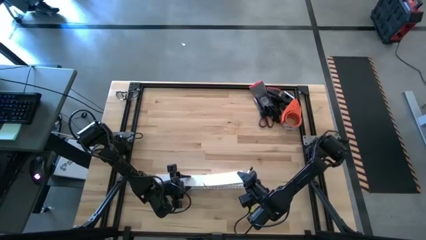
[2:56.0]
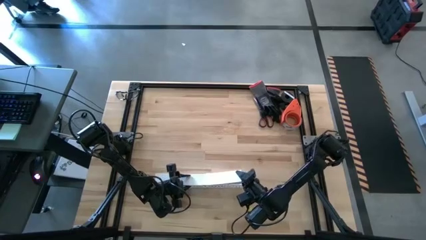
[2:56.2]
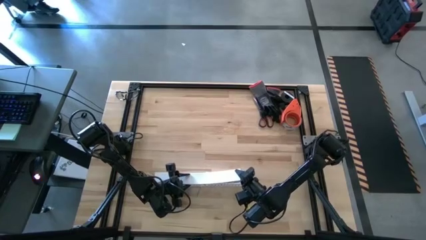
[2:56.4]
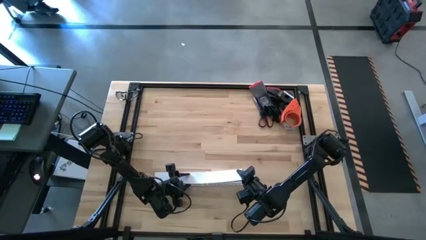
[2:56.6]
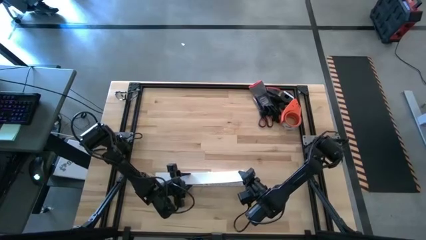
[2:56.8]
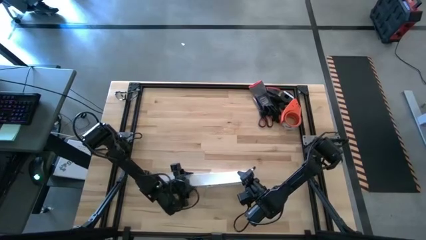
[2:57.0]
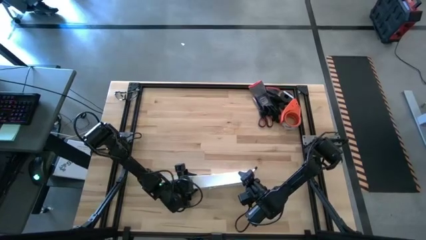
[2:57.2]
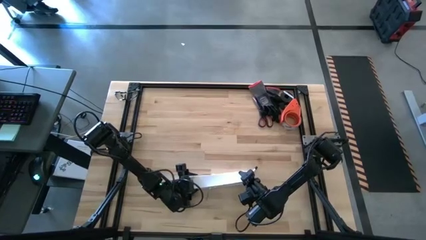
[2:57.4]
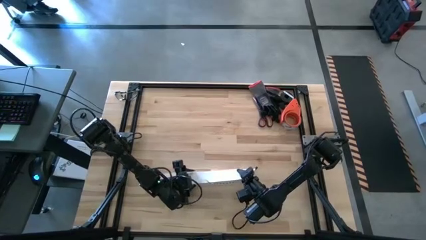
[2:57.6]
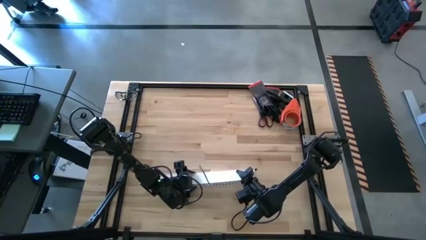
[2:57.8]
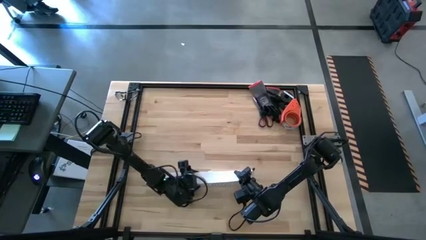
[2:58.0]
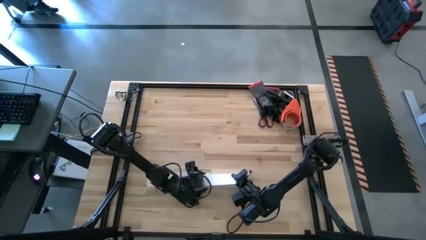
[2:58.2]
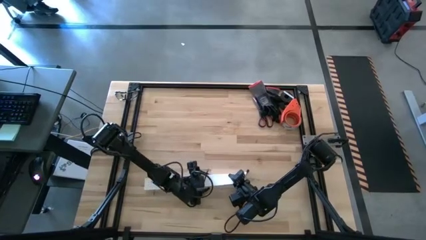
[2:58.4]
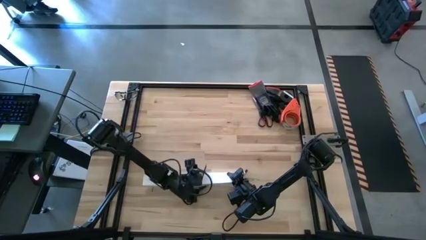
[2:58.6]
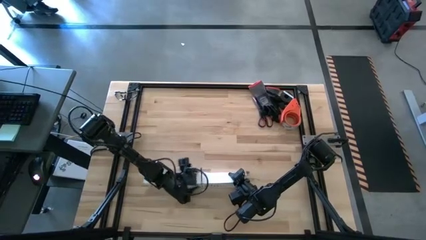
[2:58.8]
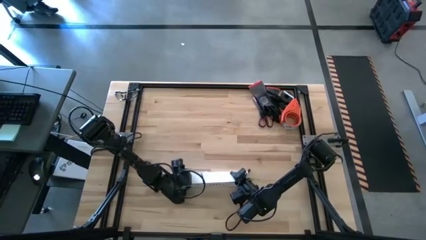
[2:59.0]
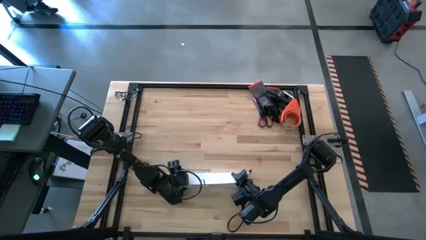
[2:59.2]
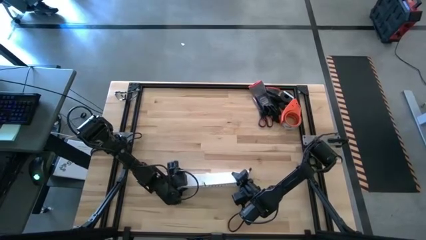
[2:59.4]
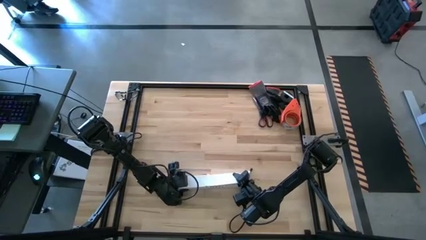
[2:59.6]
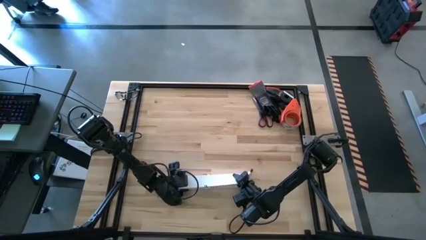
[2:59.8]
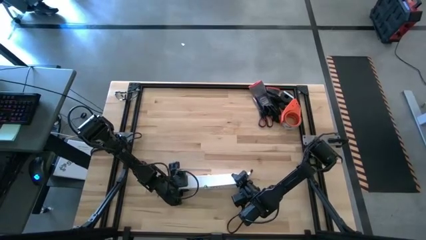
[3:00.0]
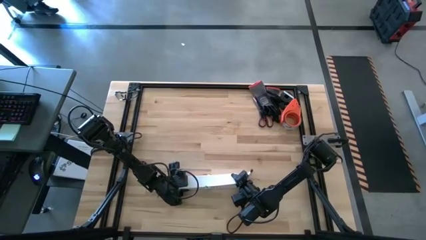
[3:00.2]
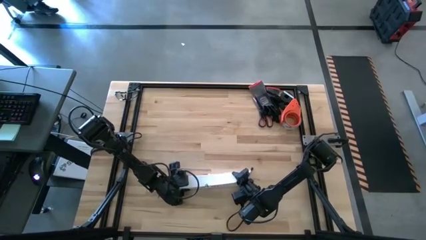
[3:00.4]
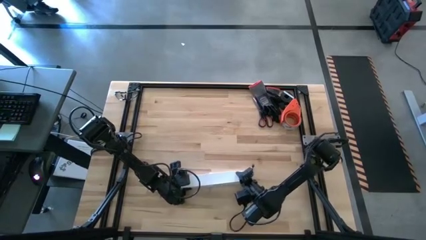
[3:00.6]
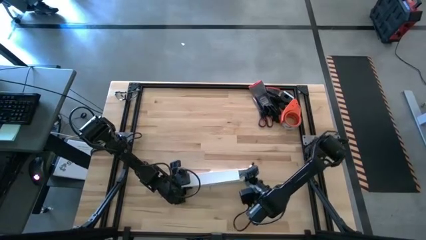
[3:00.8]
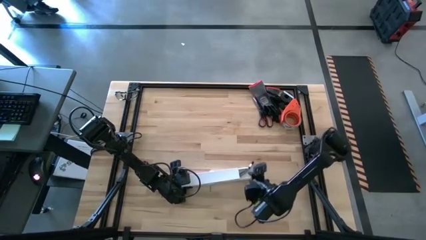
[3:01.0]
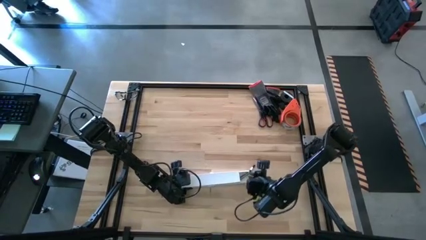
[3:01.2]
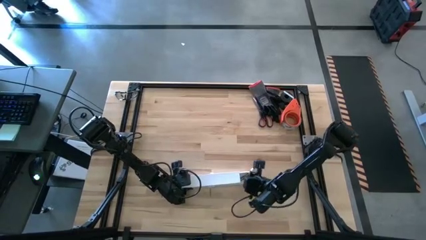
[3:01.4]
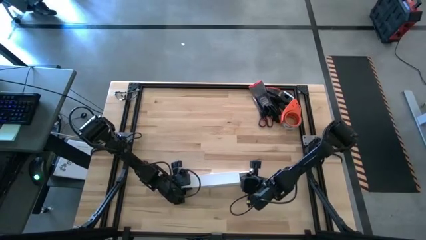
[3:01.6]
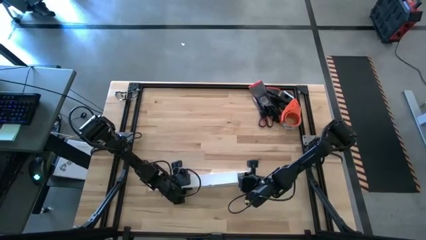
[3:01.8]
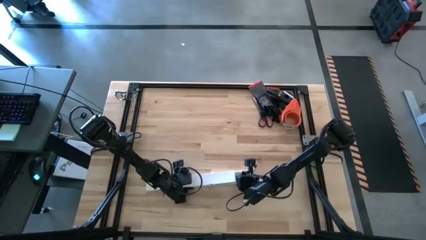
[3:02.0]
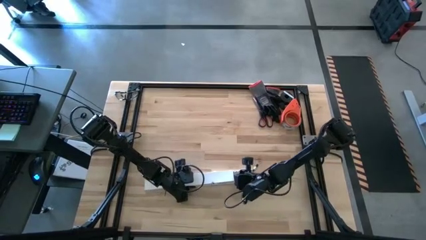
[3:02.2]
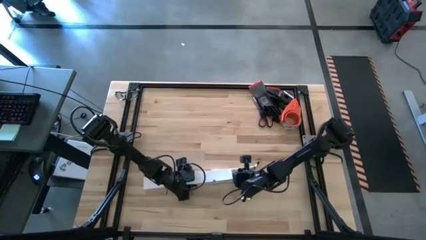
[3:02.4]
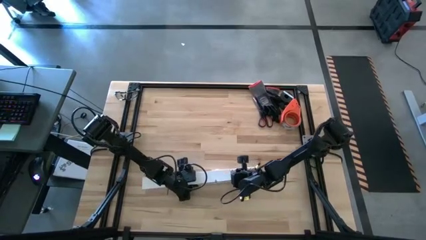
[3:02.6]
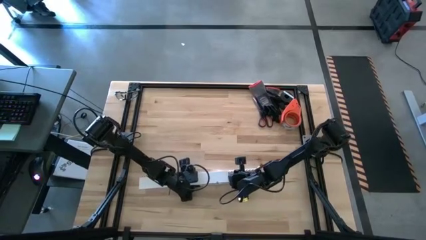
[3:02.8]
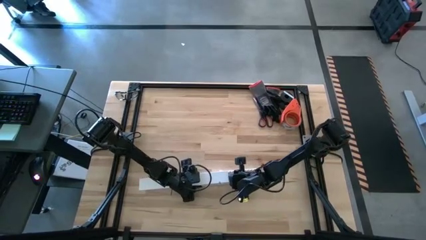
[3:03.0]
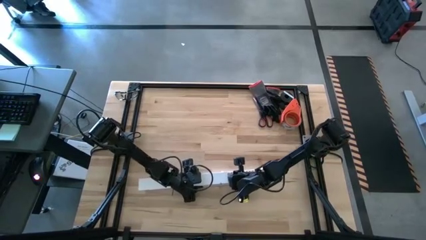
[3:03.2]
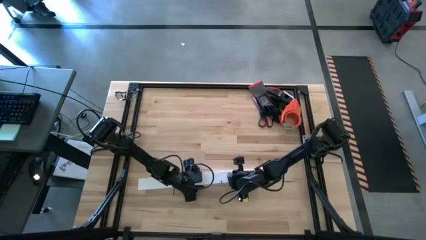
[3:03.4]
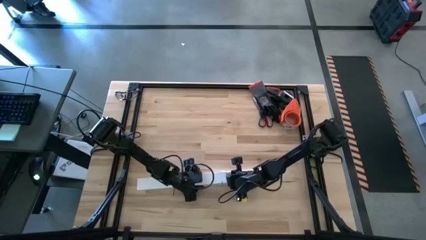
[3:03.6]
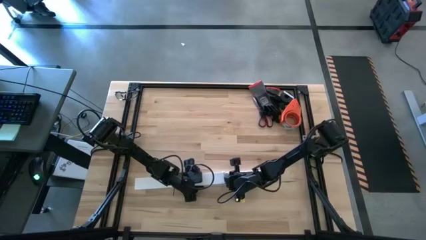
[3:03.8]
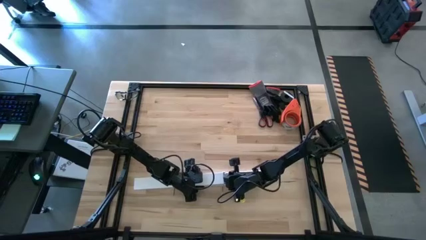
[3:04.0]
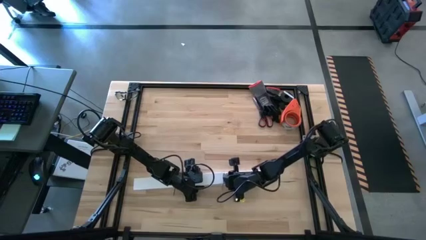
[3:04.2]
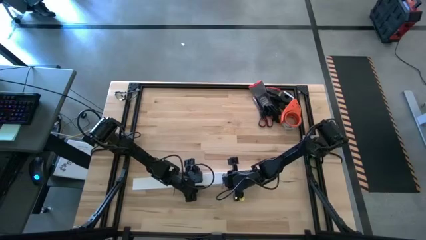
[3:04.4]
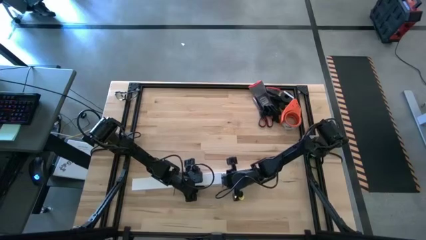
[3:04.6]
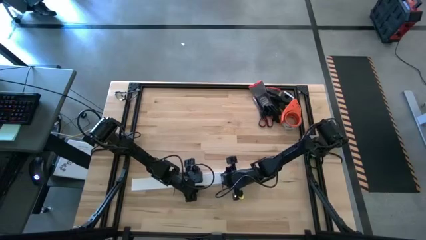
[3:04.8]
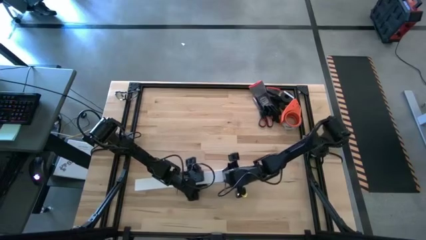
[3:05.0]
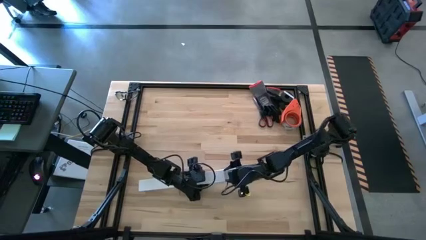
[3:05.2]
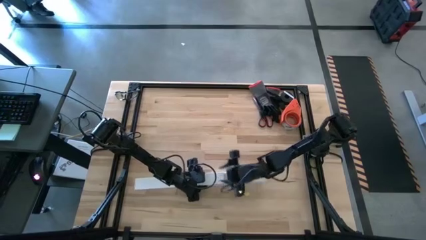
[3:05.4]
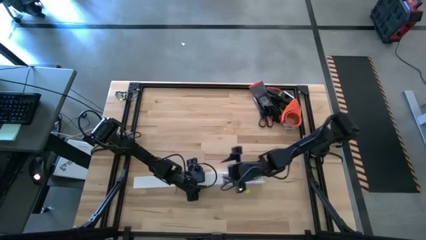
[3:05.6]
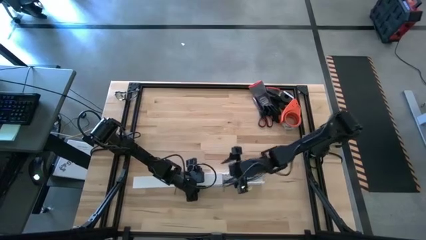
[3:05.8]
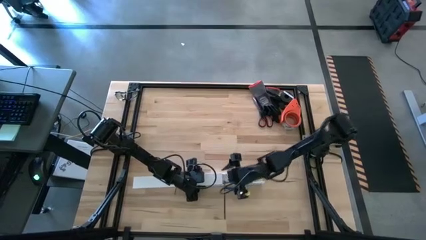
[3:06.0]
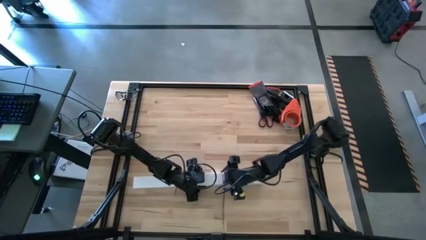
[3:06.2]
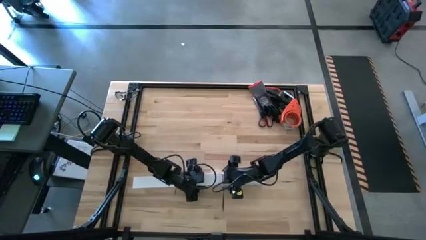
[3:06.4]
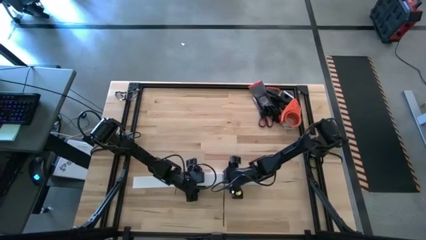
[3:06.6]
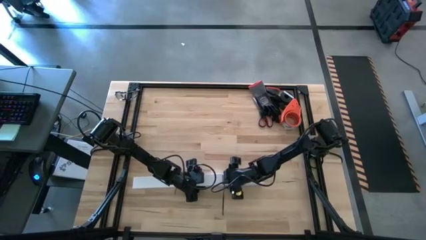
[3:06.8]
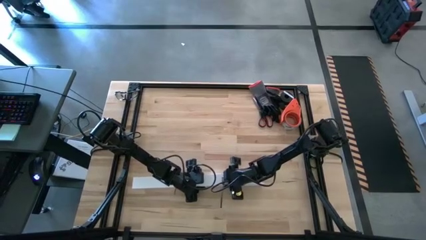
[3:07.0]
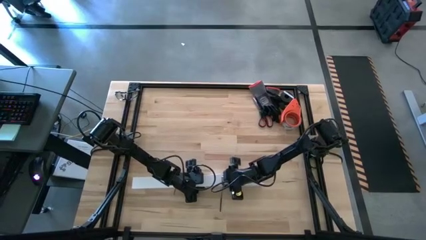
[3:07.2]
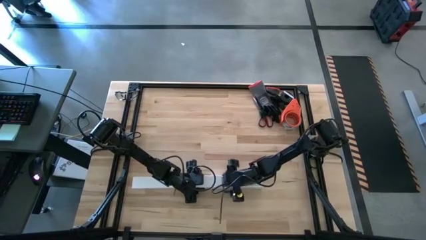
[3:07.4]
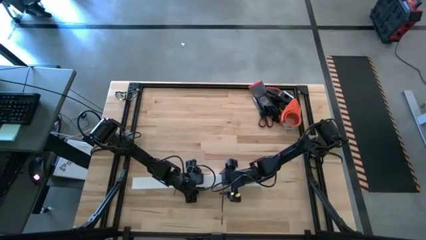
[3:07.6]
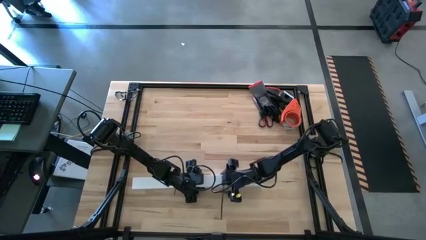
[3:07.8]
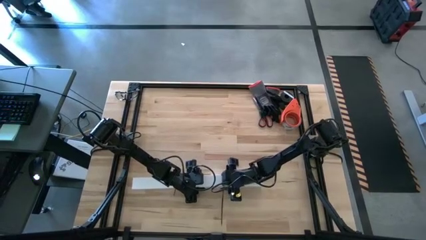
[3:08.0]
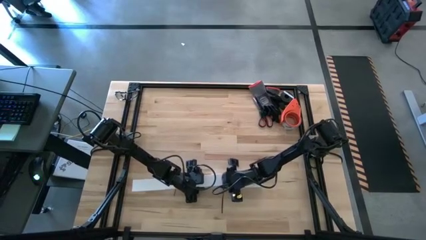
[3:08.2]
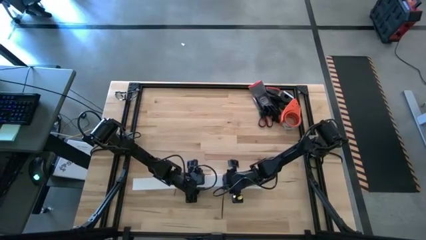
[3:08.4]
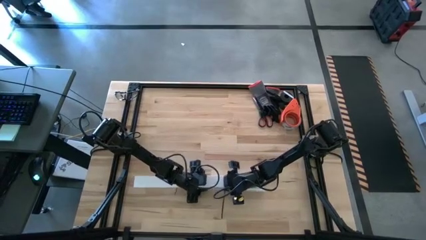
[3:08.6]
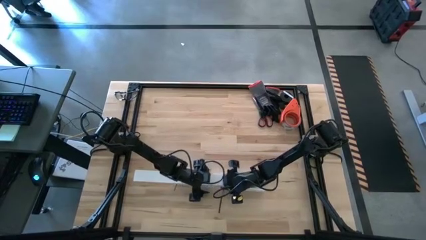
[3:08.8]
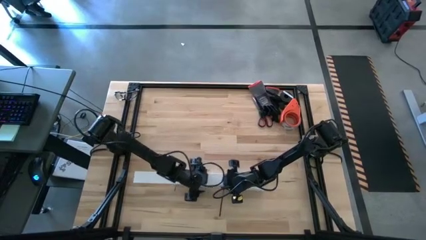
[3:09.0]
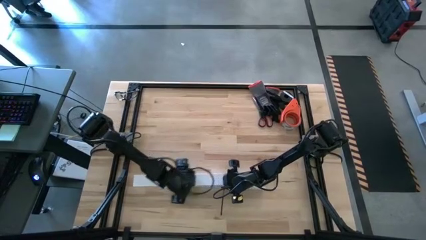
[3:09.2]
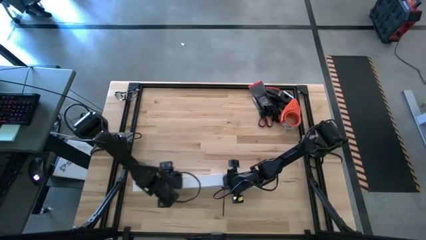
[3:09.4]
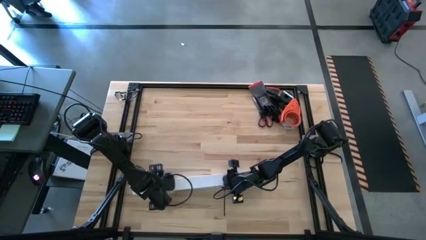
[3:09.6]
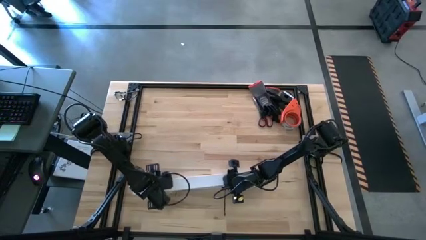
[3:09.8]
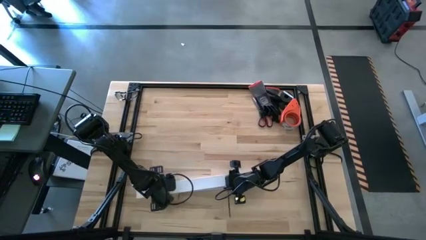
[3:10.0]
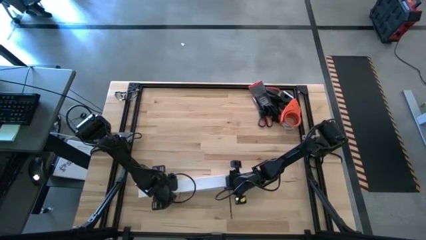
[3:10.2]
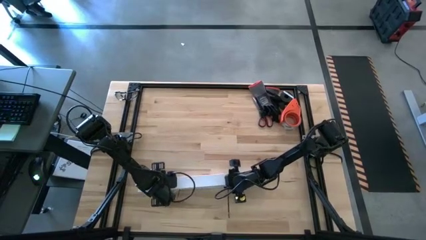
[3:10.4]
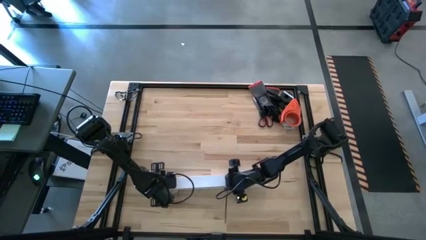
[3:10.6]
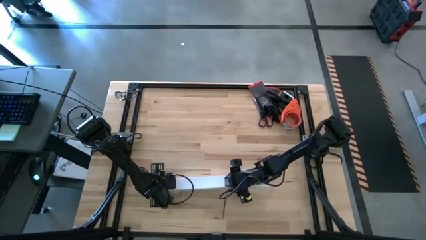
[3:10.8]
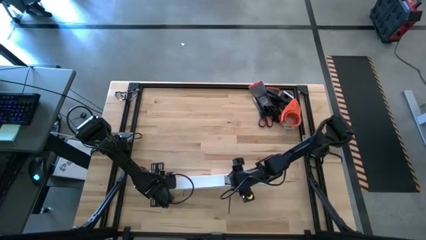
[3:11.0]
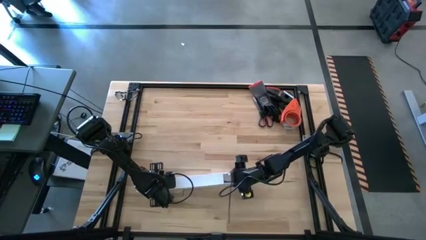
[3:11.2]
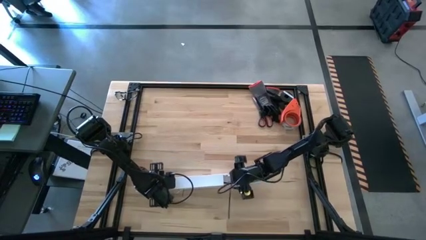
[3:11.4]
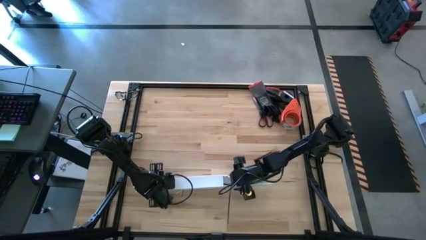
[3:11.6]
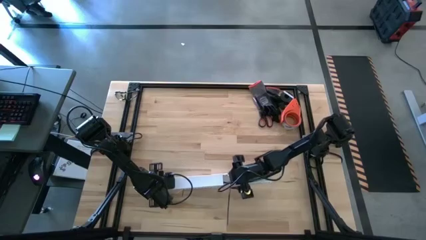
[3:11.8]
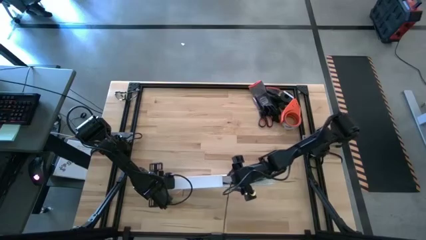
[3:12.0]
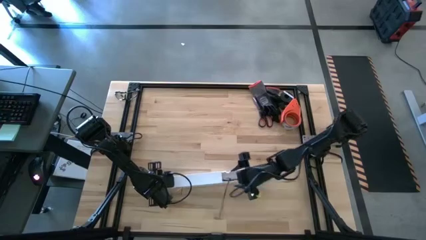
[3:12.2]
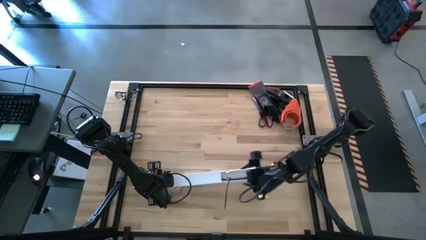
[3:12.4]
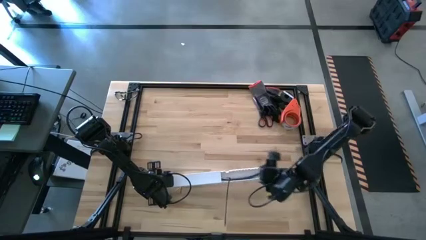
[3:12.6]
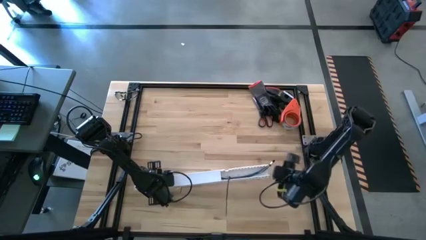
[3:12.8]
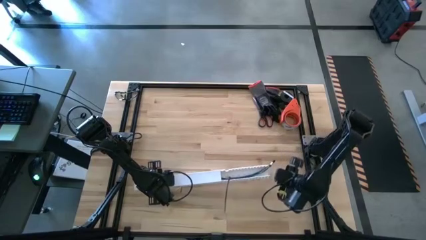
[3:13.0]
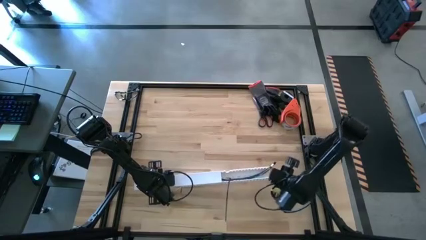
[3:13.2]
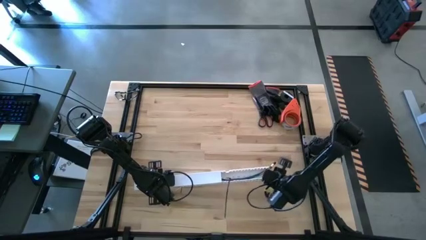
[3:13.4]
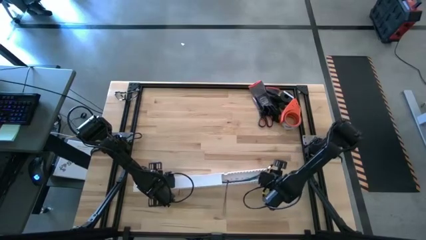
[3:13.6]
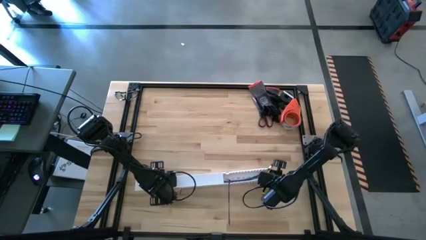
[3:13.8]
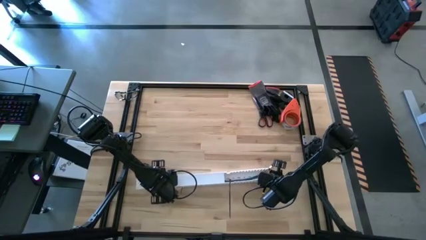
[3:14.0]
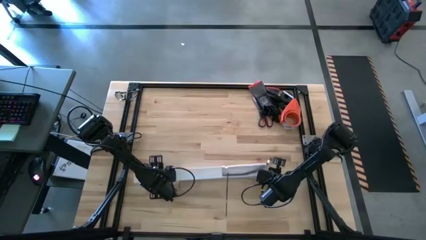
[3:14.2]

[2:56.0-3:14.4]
Task: Ziptie cables
Close the white cable duct
